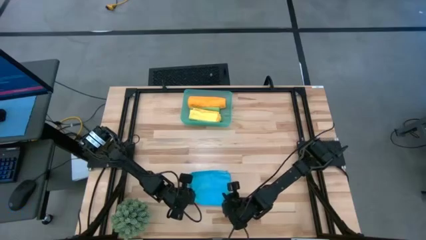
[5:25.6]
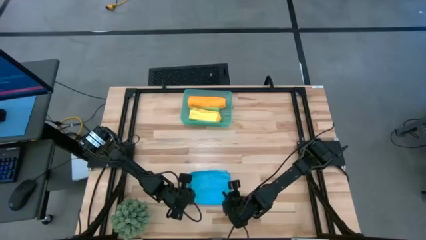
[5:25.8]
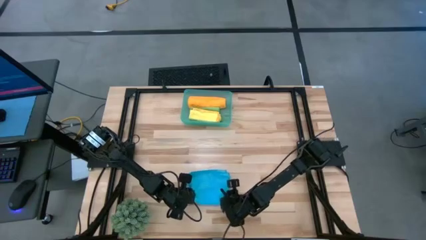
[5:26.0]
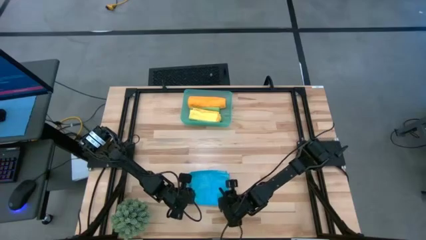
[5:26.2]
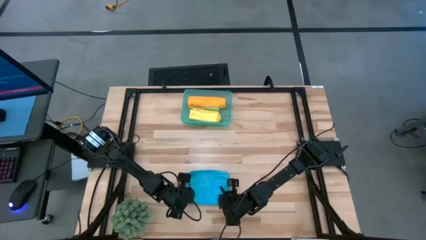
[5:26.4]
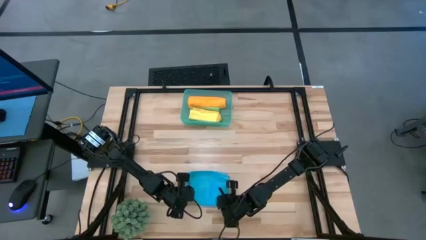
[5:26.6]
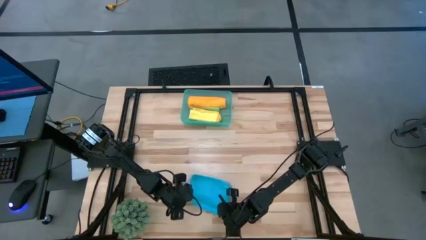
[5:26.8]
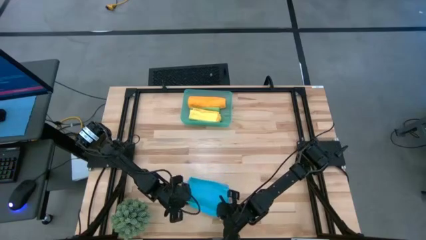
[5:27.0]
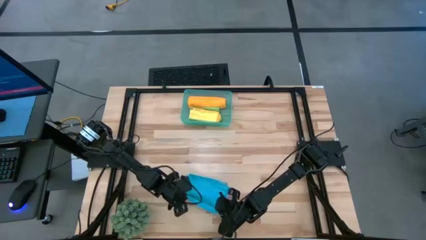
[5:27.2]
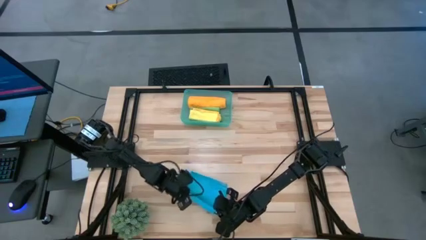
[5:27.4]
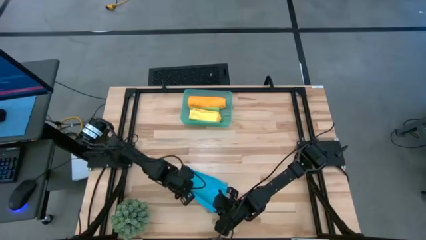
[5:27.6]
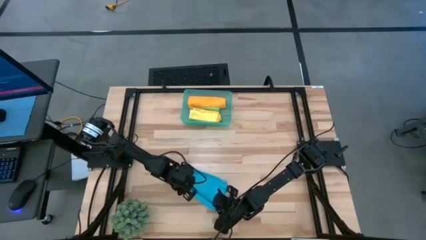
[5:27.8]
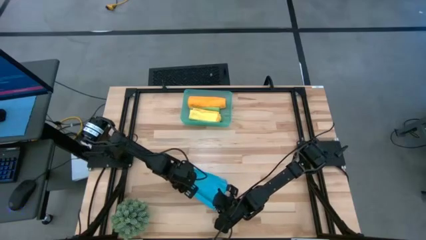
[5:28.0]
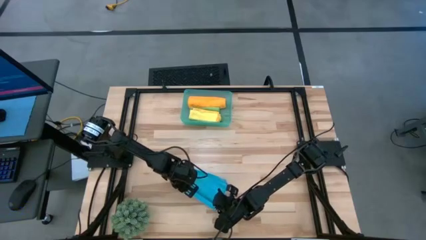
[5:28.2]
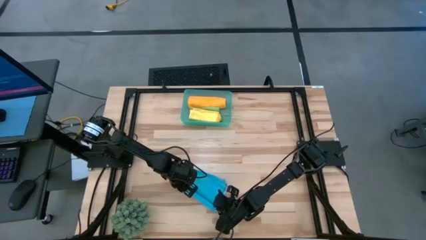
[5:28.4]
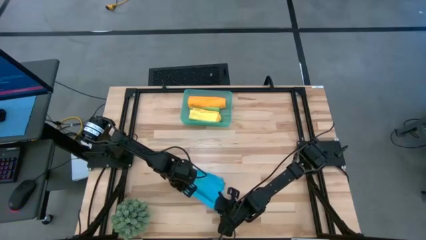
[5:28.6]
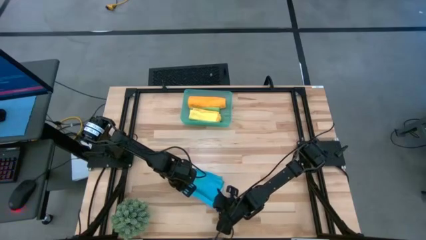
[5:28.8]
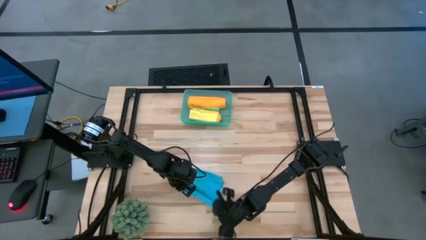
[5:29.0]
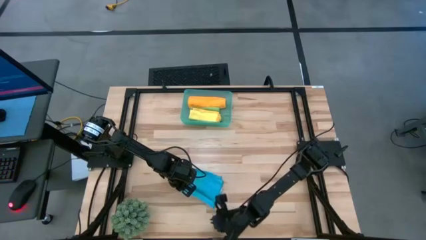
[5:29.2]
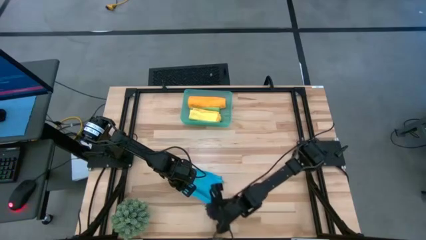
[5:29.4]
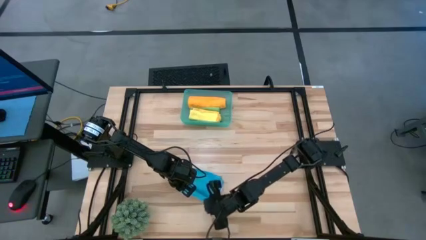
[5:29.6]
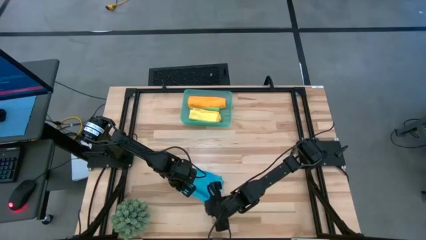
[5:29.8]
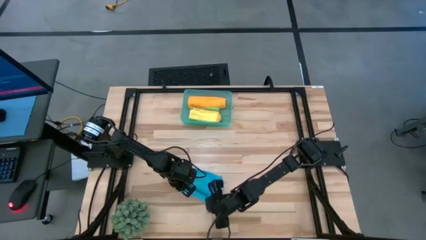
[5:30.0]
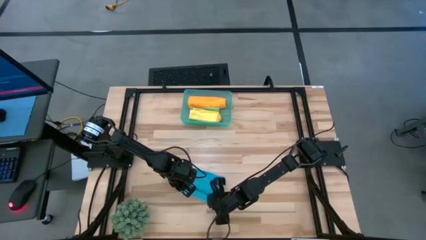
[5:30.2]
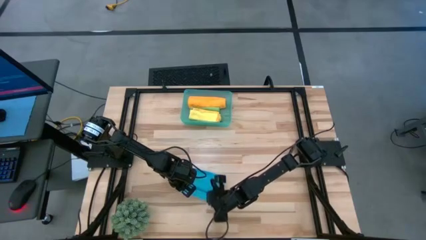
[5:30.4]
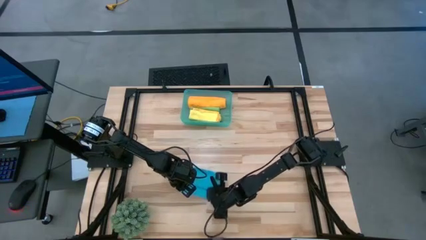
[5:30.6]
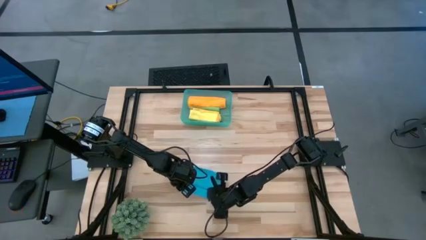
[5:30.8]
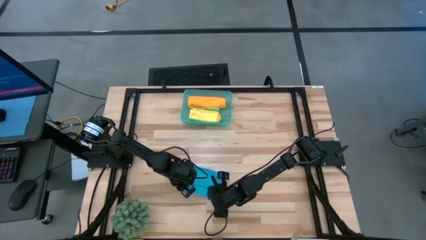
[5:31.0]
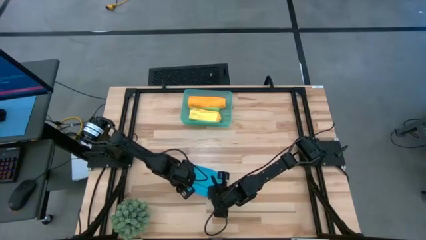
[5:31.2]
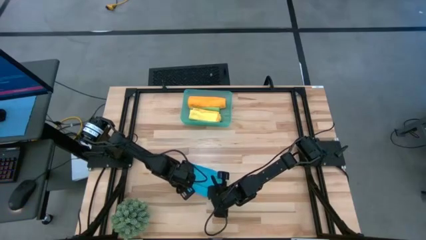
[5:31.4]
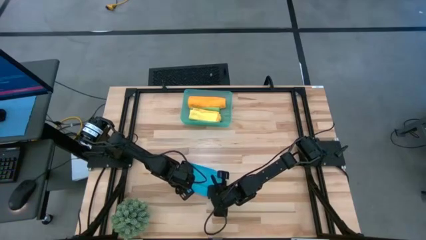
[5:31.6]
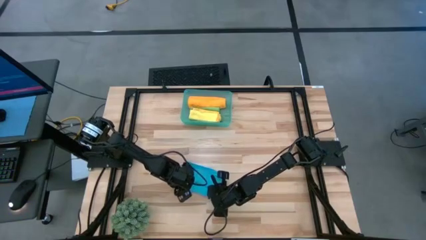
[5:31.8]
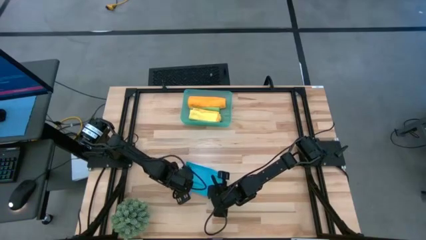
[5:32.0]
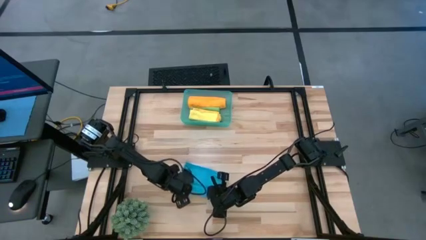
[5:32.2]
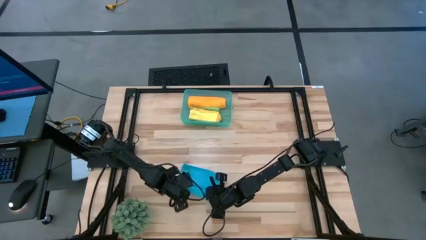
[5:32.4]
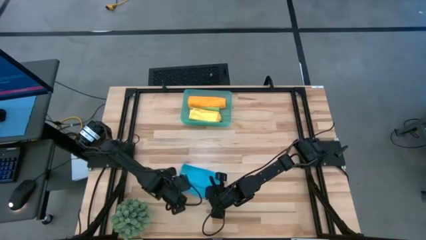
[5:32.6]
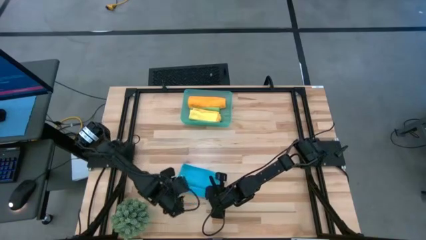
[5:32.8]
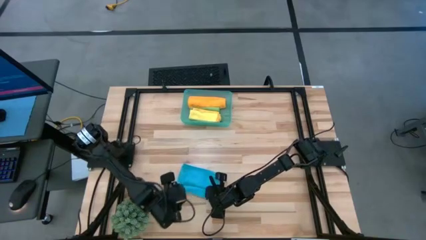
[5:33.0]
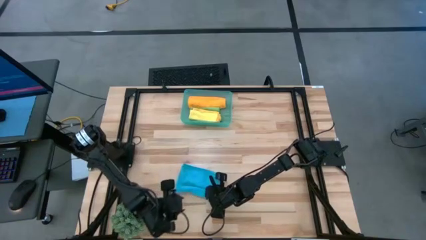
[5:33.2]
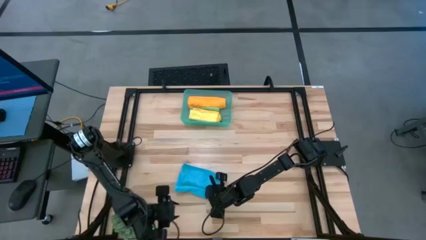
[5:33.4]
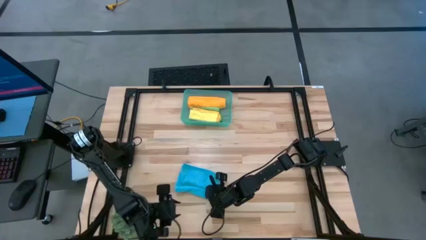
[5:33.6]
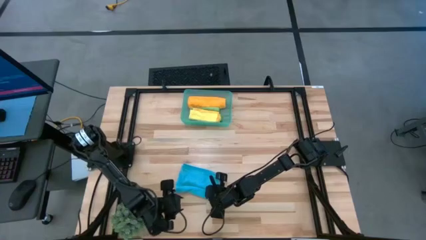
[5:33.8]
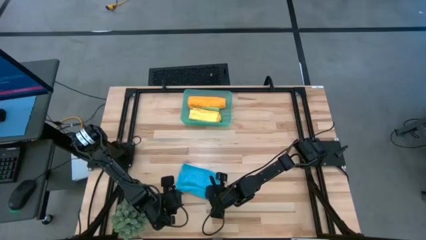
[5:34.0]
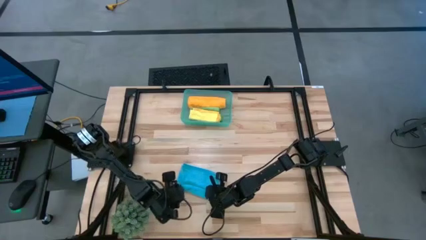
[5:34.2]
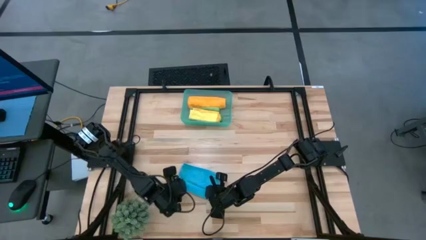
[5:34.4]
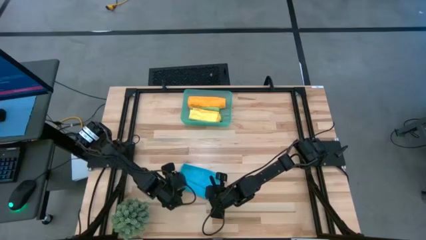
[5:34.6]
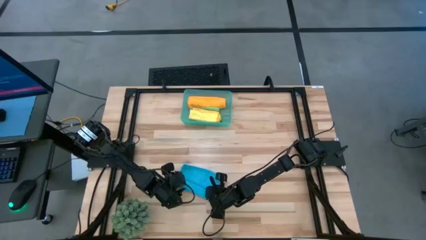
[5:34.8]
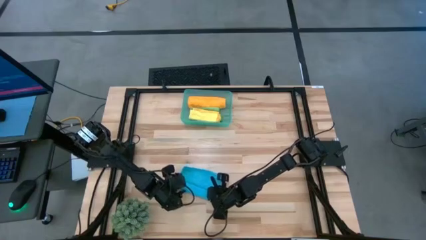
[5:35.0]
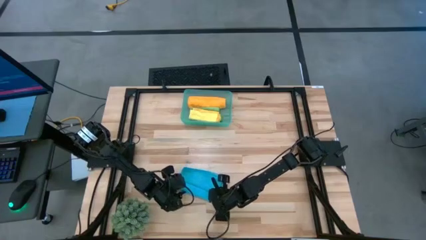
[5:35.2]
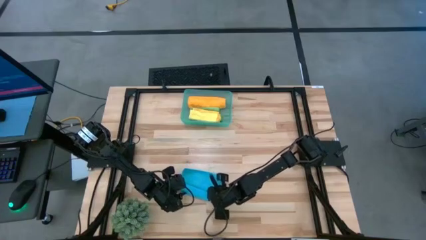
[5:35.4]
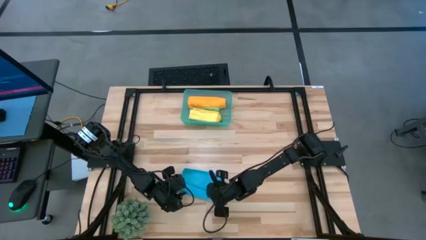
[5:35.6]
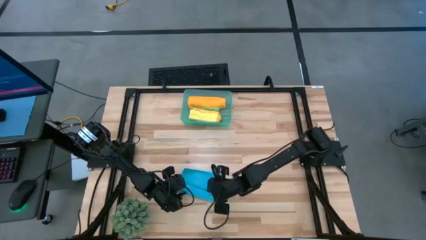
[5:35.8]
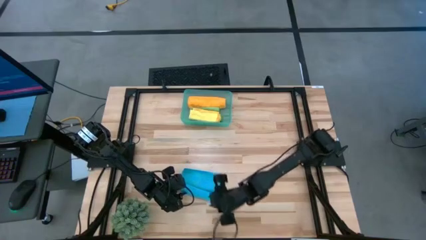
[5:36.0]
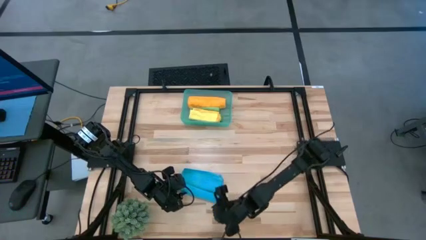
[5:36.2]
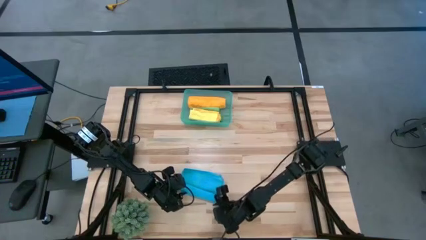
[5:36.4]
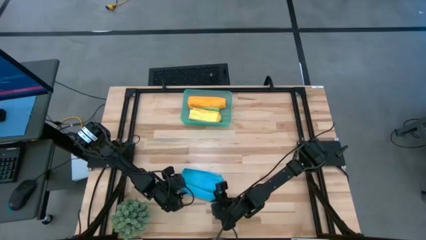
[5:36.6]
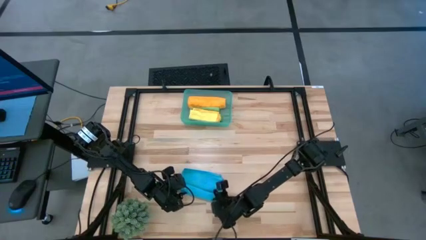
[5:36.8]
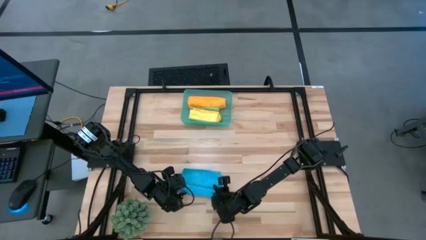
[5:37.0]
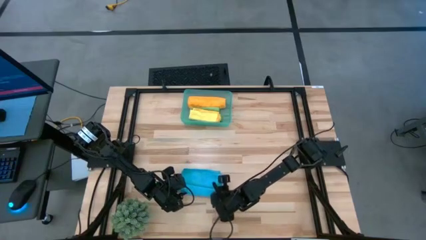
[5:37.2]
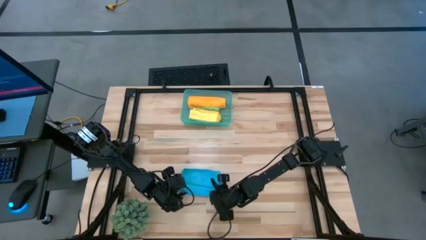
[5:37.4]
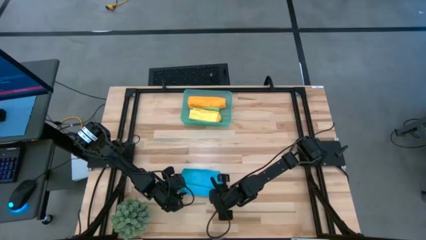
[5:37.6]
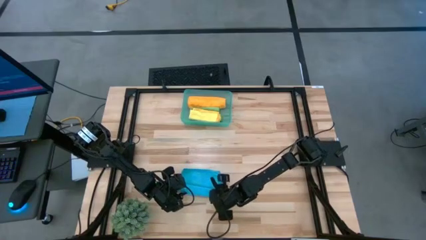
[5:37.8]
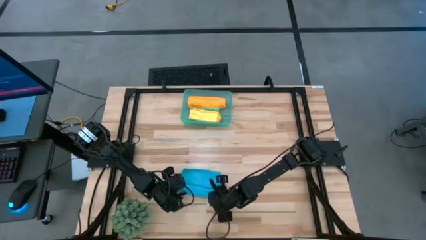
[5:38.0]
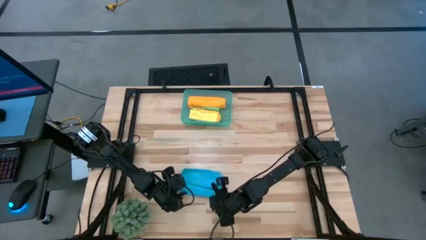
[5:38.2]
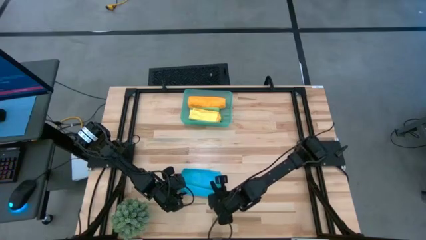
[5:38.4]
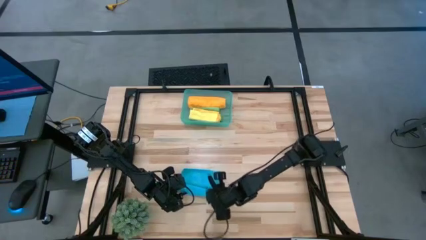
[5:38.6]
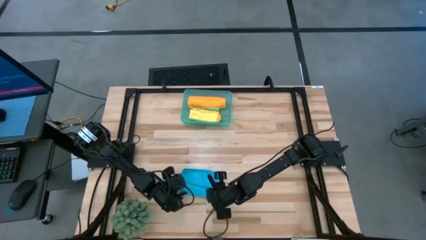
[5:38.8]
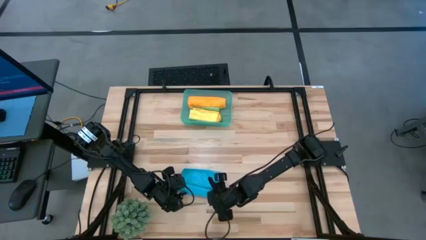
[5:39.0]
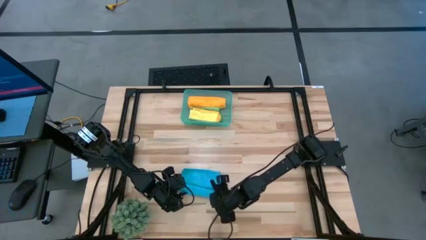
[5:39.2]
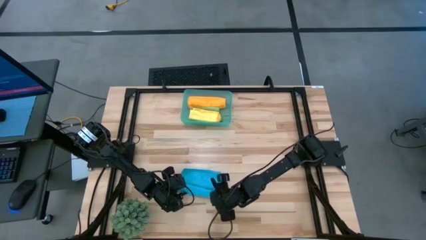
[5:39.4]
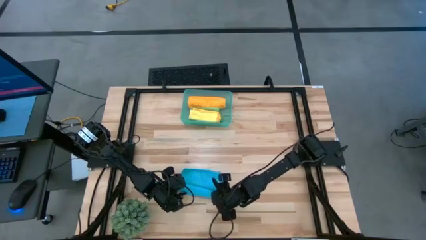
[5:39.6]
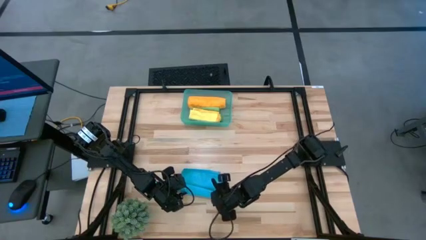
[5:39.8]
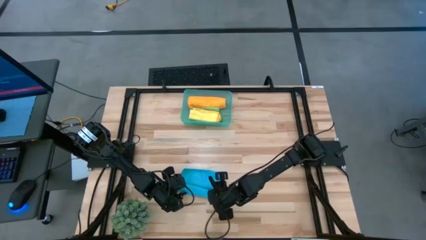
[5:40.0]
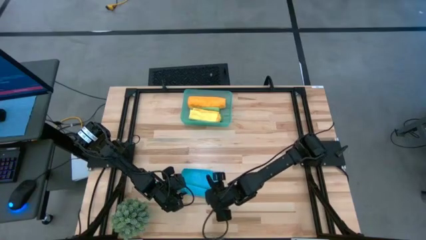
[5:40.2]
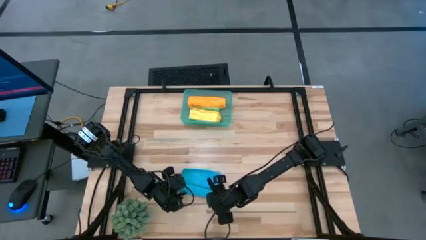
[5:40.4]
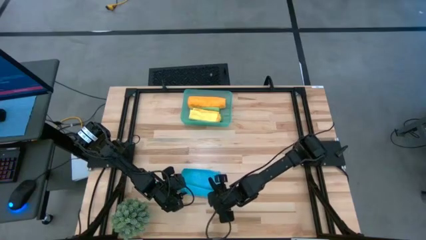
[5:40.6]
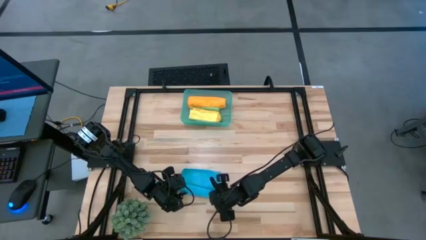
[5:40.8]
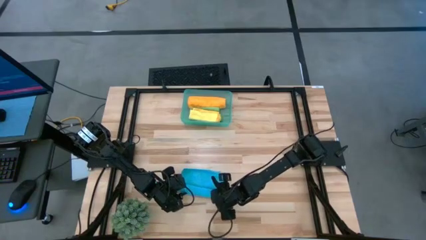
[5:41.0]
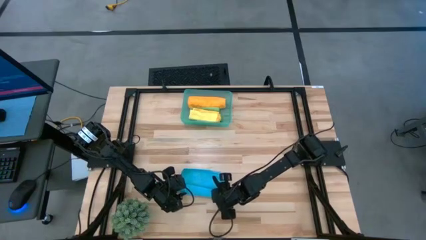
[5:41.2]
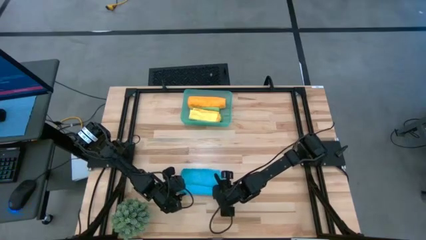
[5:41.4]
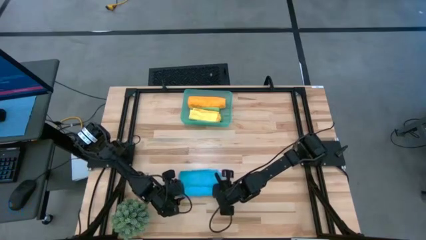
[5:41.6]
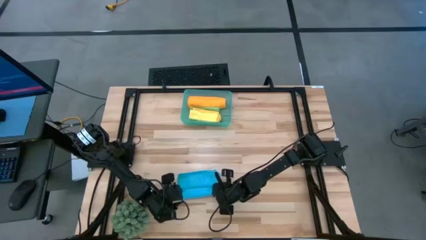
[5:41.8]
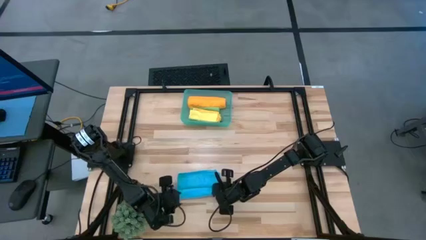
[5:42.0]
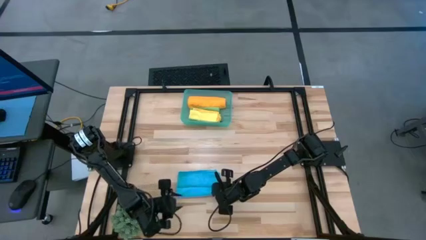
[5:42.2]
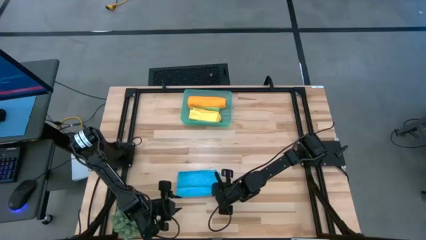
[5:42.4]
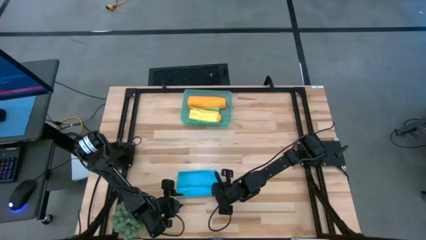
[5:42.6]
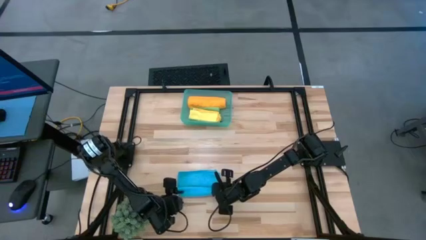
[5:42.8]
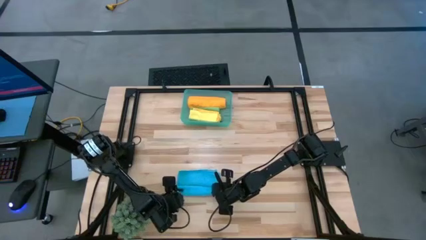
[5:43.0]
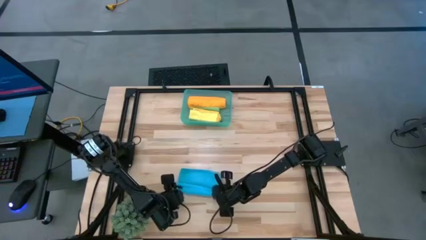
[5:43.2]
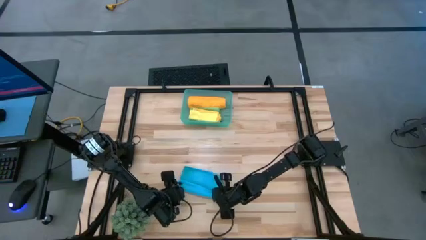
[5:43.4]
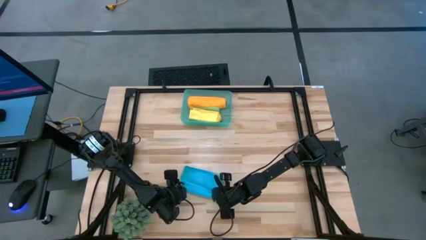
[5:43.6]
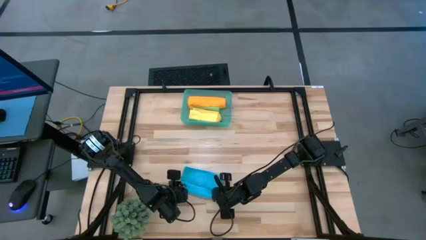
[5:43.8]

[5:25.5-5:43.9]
Task: Roll microfiber towels into tight, uniform cylinder then place into a basket
Fold the blue towel
